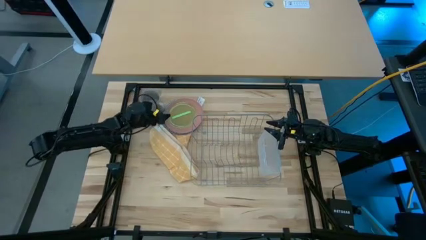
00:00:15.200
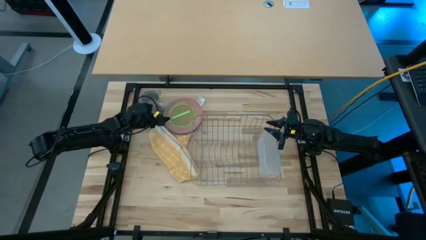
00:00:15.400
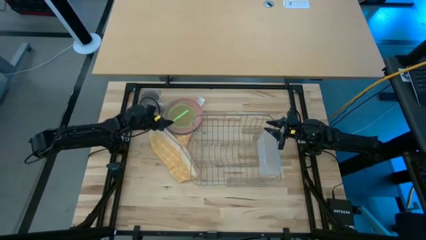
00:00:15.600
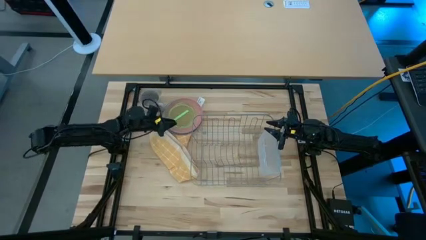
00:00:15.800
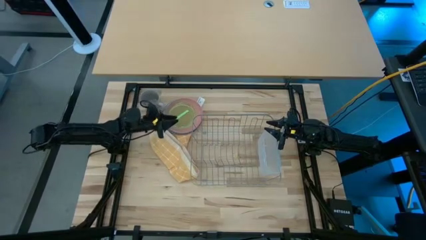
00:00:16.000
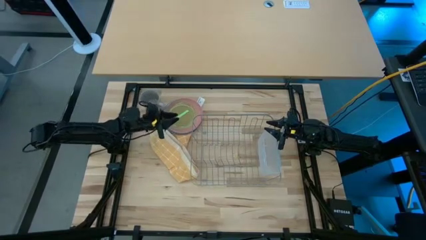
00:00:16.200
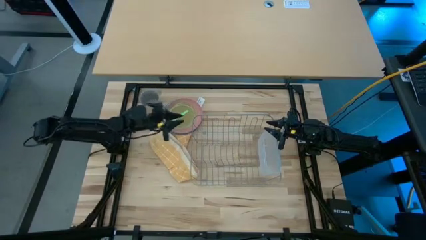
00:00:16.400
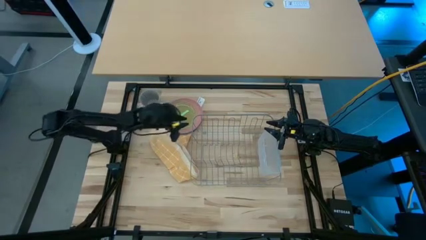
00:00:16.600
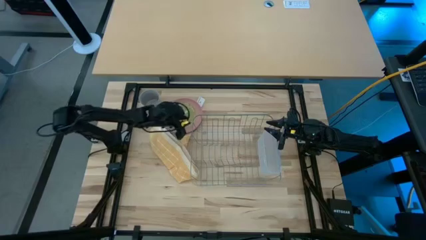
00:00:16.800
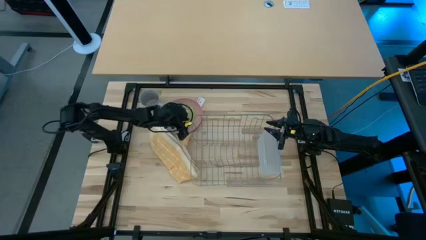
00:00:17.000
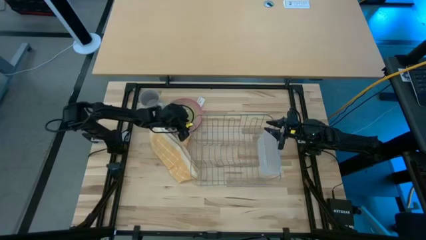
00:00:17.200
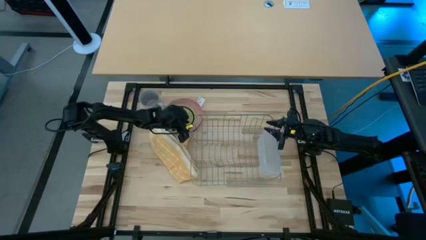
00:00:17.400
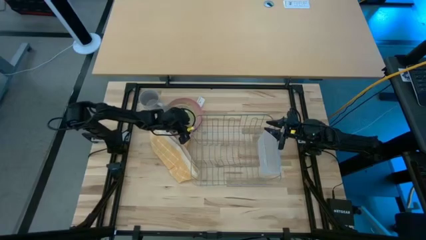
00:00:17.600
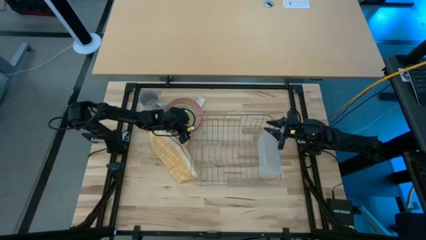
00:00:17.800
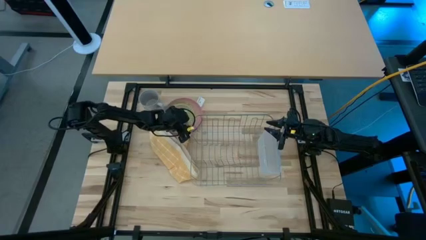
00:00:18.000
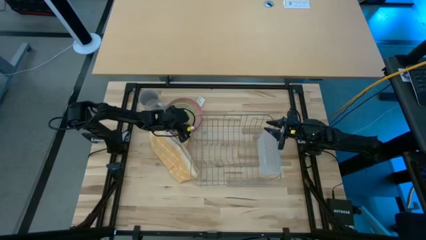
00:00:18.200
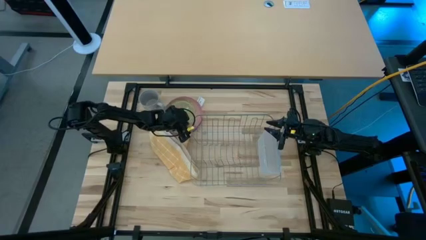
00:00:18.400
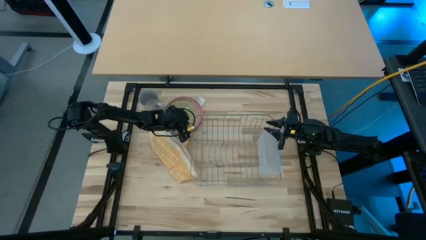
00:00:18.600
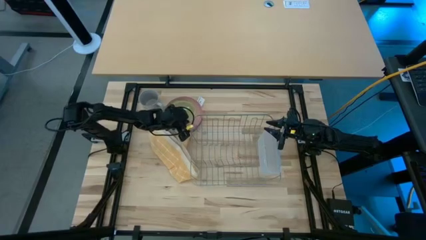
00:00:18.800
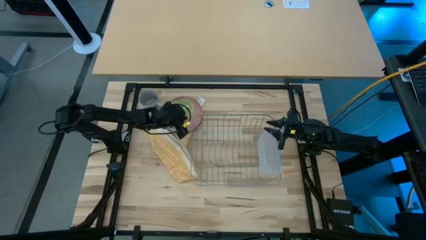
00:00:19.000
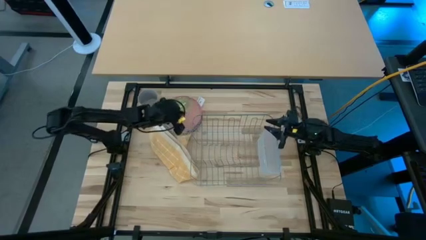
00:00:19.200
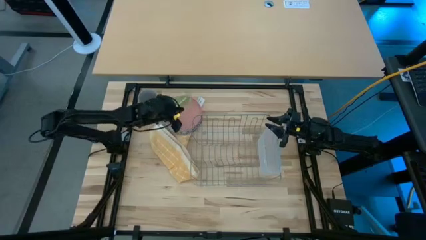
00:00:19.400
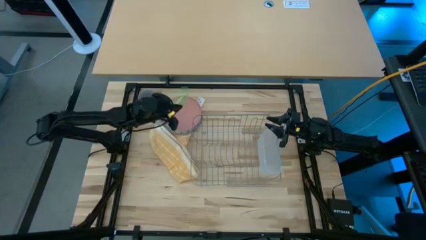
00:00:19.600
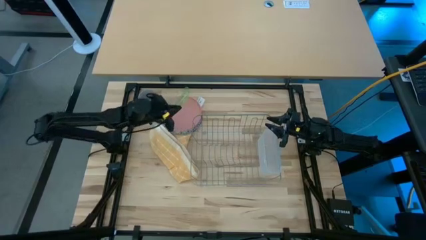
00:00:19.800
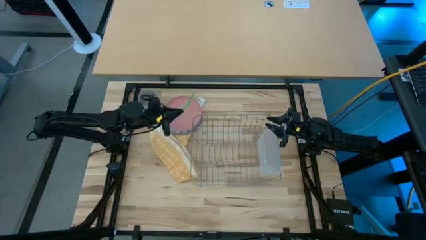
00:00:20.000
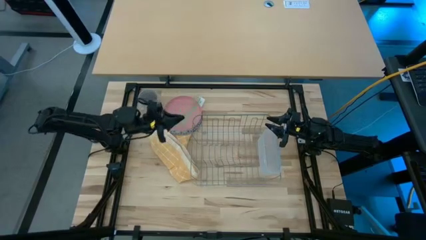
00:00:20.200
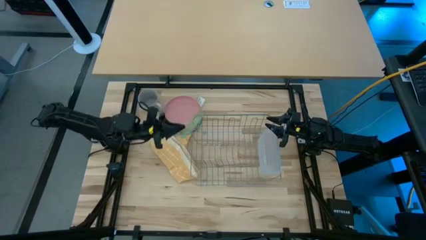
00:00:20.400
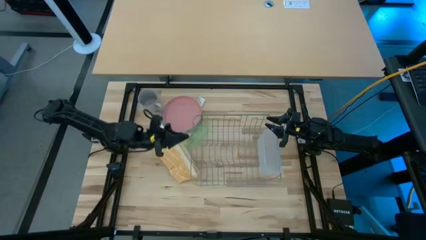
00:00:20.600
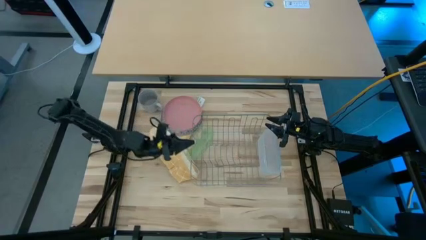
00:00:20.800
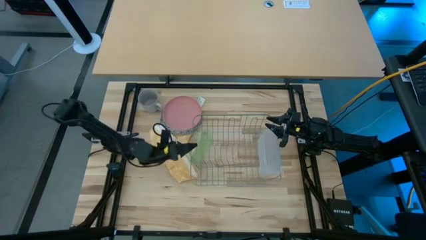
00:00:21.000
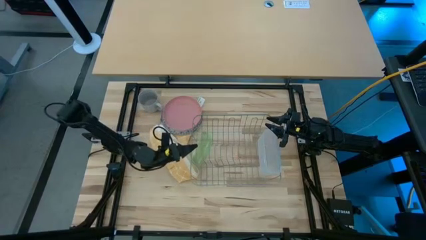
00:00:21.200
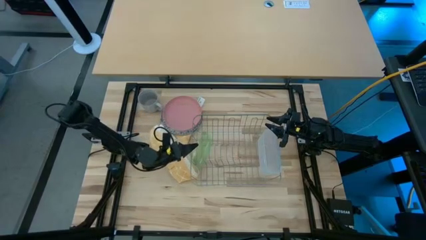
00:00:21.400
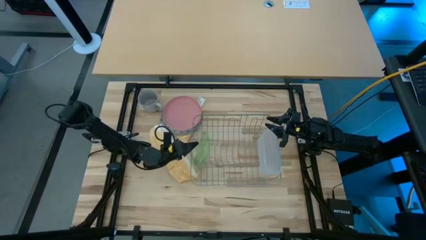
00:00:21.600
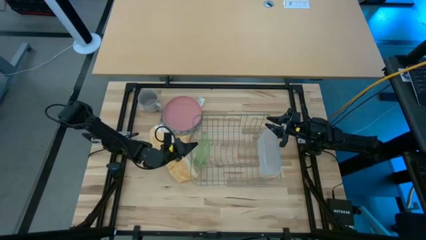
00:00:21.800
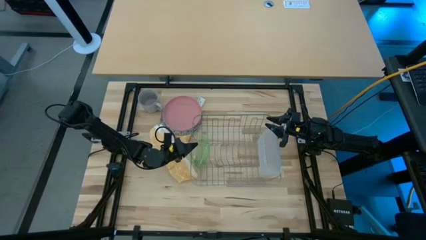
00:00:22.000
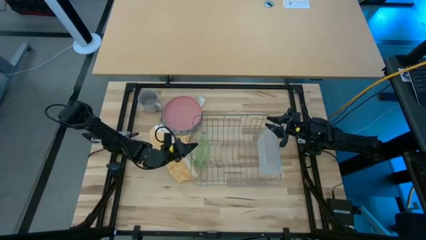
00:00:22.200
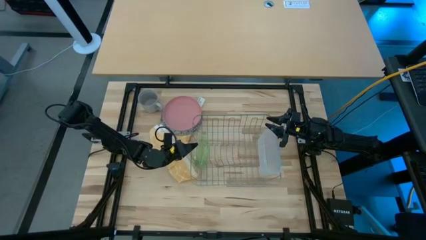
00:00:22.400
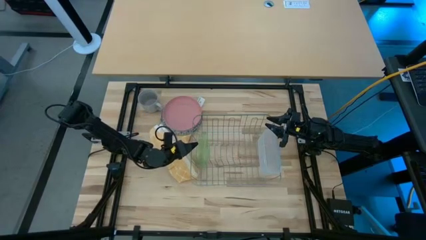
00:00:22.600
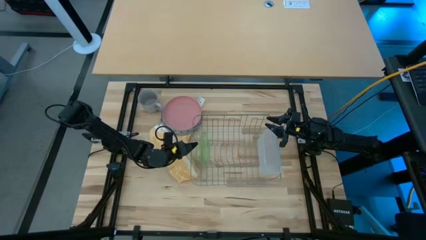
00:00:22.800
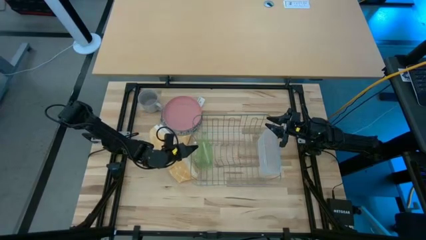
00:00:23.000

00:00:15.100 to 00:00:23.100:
Task: Sort dishes
Put the transparent green plate in the dish rack

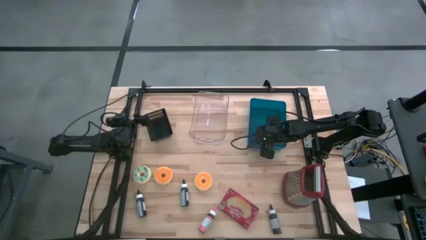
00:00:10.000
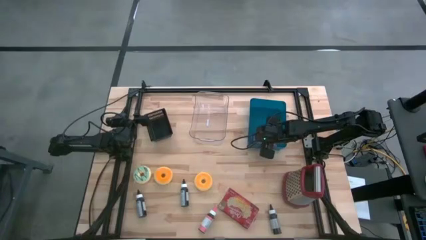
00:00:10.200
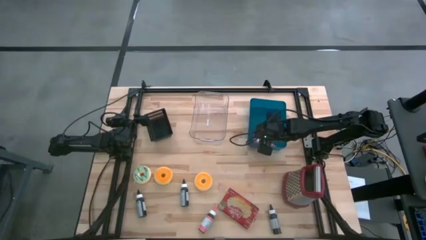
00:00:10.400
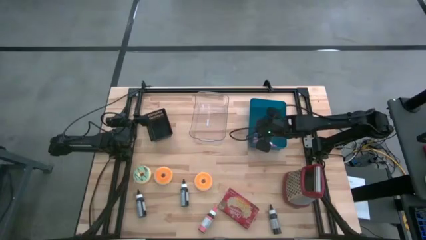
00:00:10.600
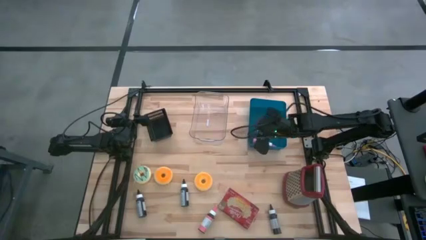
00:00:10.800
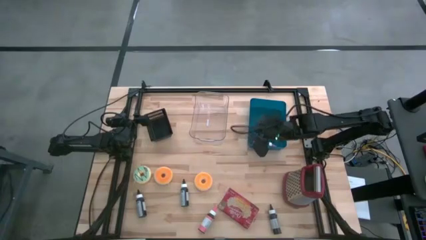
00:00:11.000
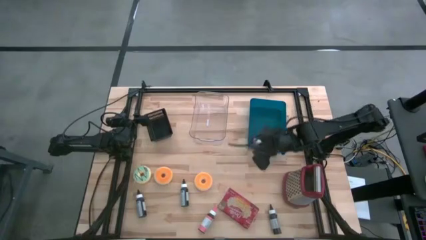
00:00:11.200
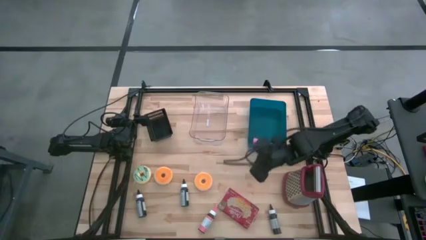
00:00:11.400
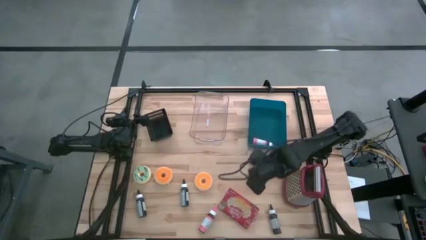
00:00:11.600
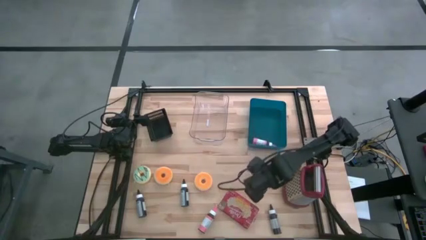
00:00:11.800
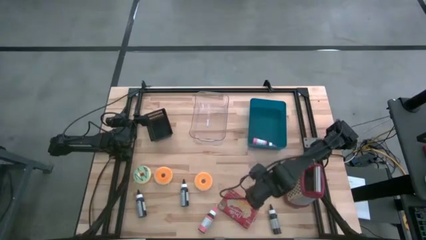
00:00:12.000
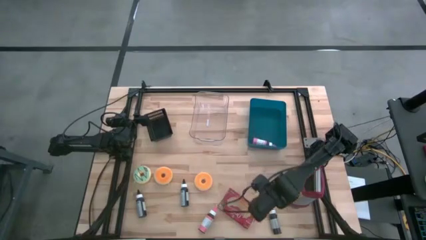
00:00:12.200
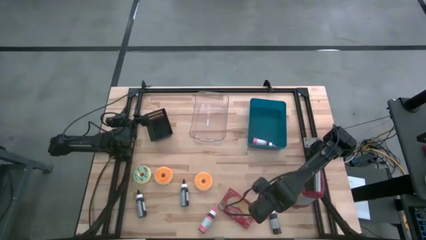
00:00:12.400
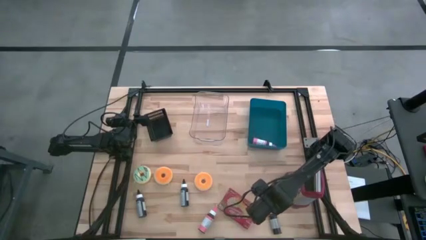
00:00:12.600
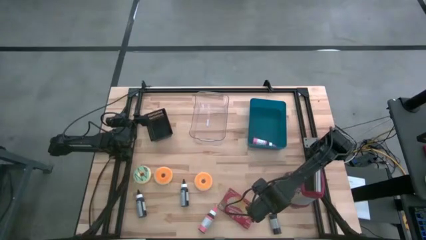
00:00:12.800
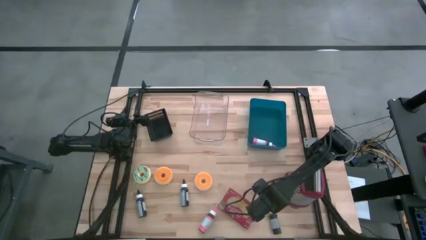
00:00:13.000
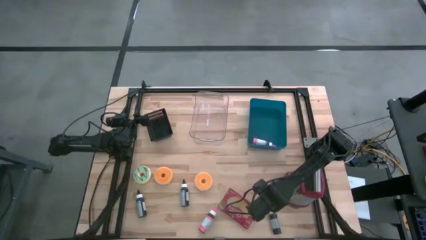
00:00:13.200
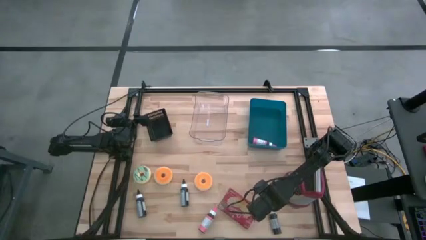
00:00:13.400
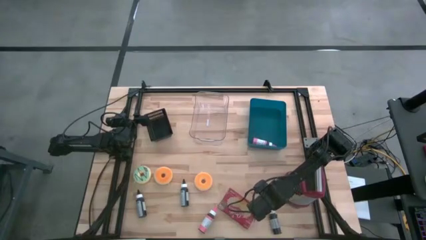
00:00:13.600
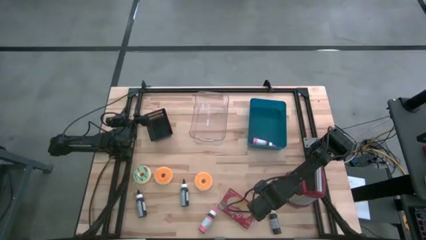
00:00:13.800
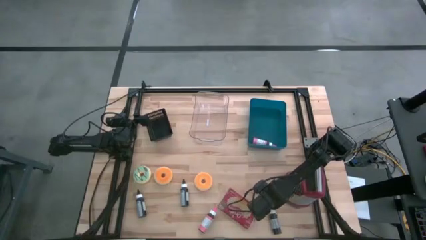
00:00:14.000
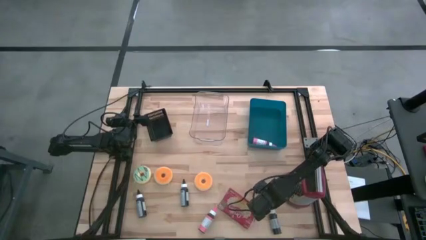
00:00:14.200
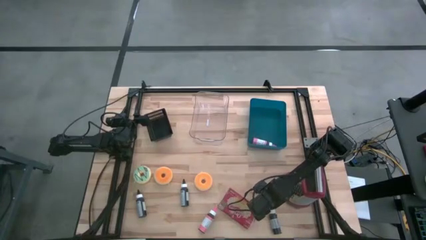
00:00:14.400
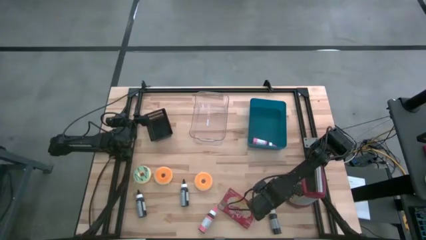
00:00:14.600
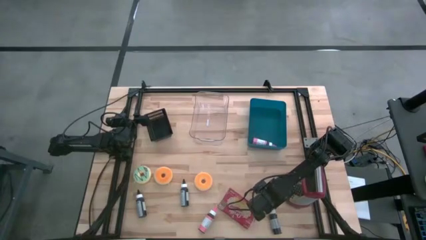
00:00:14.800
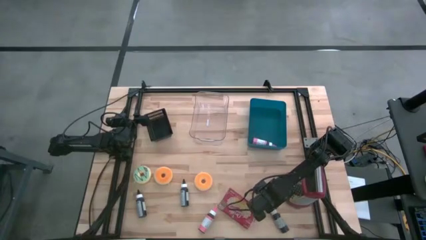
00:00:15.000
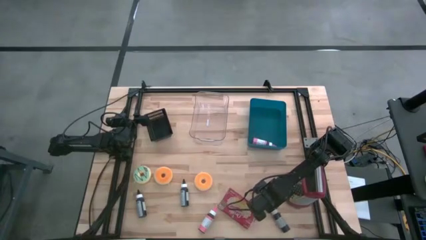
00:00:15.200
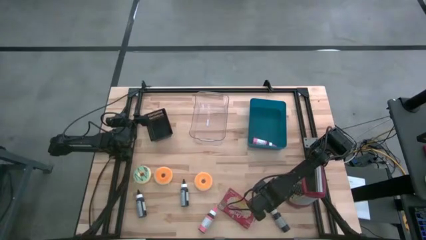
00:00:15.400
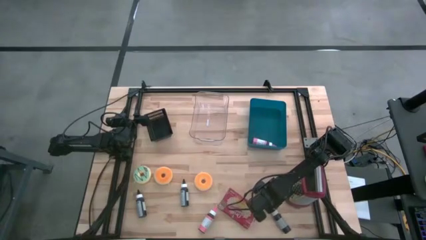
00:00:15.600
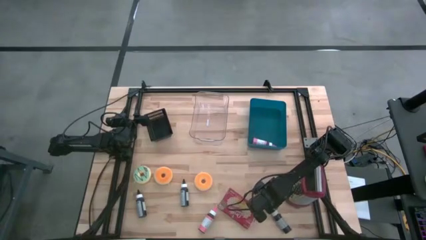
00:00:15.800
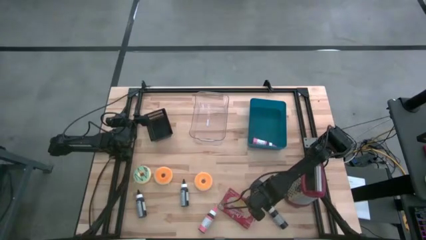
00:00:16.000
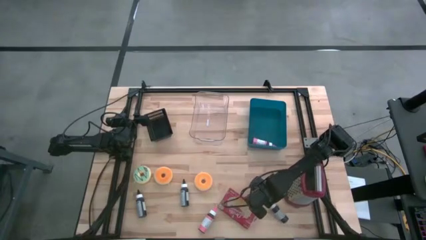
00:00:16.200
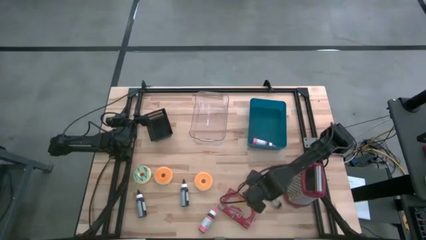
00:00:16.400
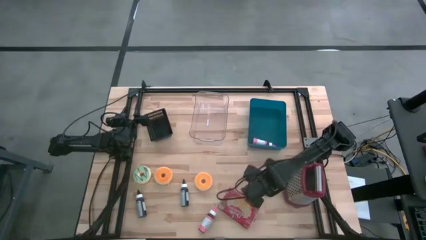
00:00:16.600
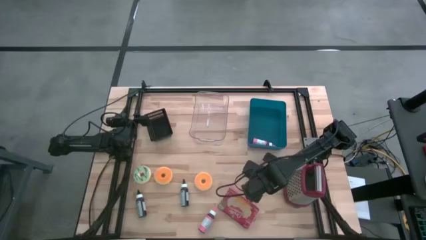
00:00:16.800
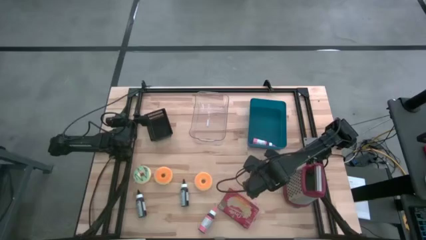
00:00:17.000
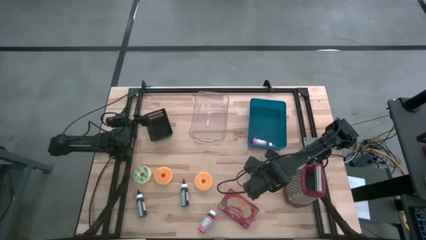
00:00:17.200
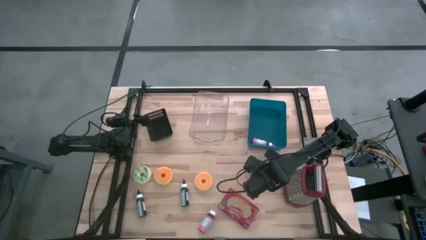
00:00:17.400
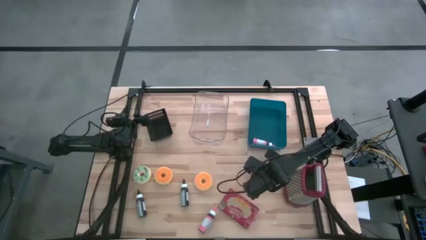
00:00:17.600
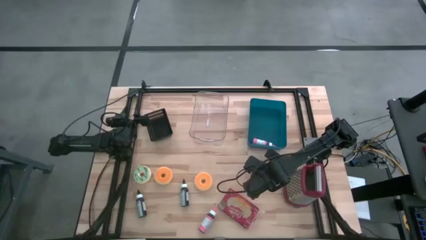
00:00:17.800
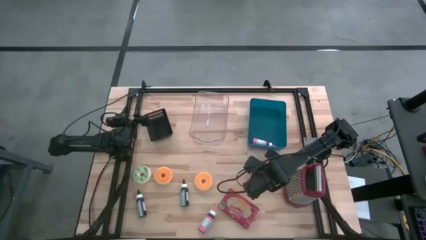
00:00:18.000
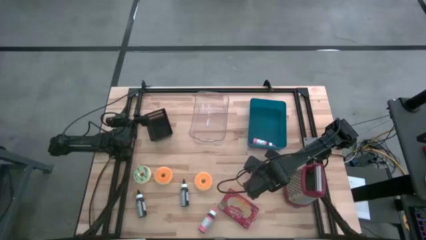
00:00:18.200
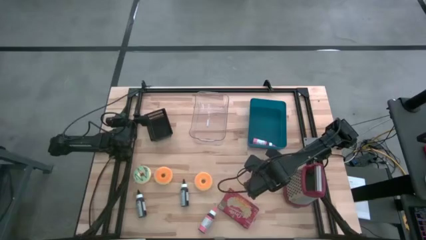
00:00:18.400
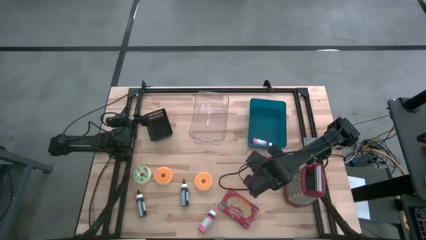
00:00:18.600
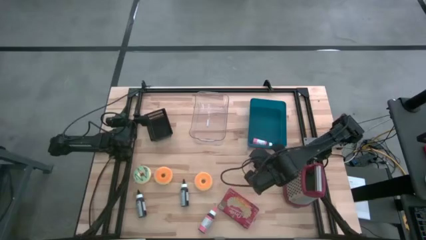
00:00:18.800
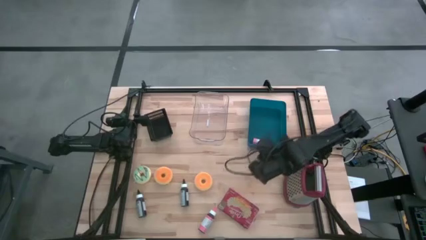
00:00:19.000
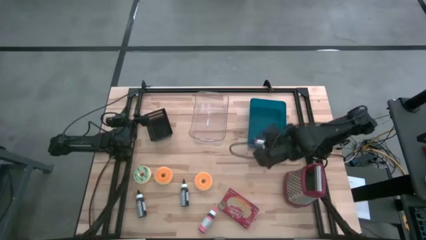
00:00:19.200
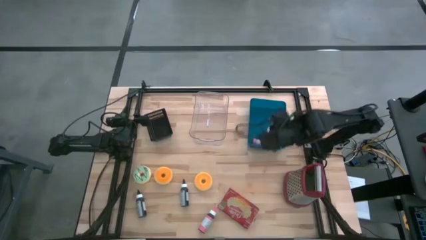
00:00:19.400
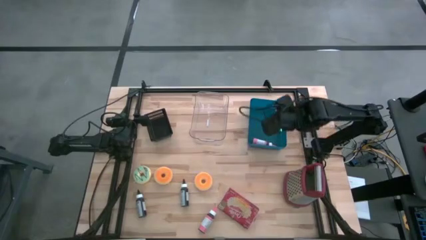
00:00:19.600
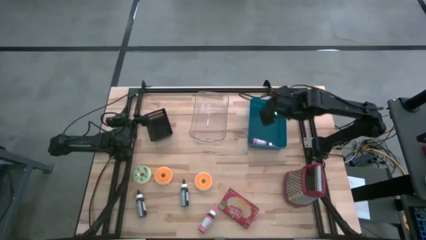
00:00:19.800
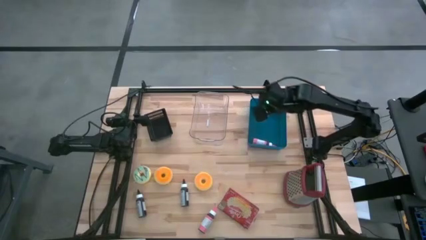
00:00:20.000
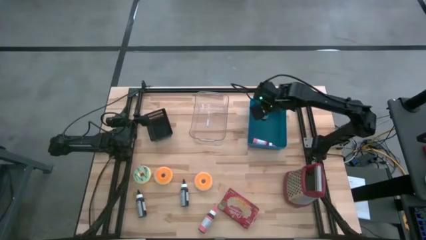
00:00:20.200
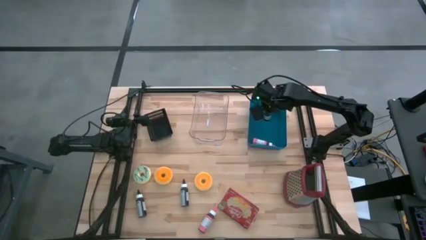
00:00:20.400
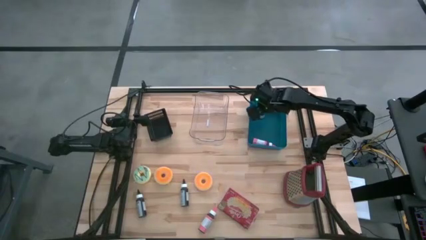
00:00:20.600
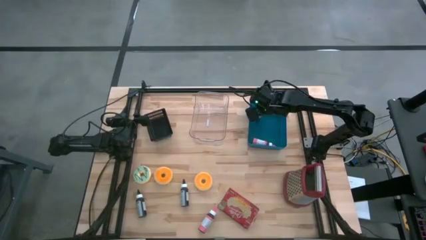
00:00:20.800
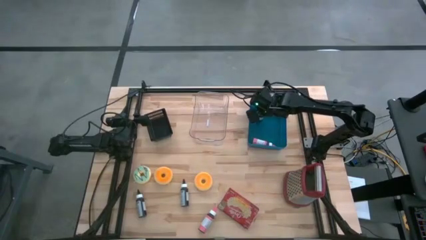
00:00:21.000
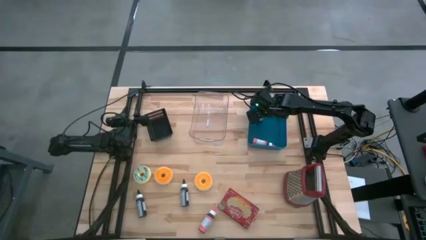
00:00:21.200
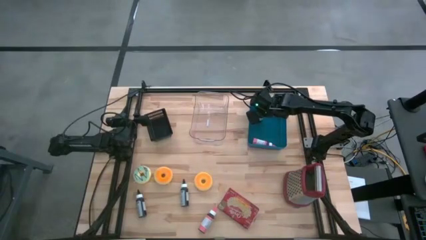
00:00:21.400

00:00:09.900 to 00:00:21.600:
Task: Pick & Place Food Item
Put the right black food coloring bottle into the blue bin
